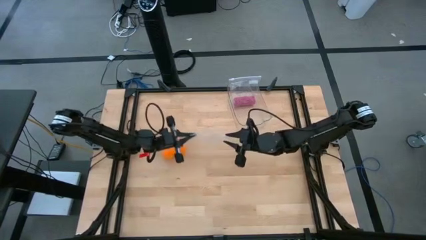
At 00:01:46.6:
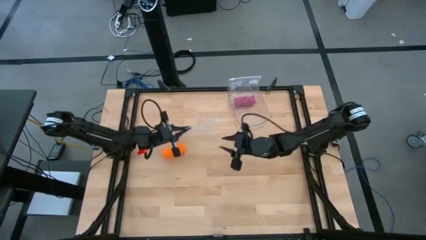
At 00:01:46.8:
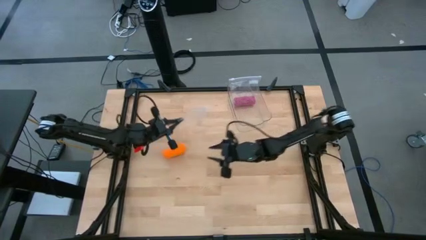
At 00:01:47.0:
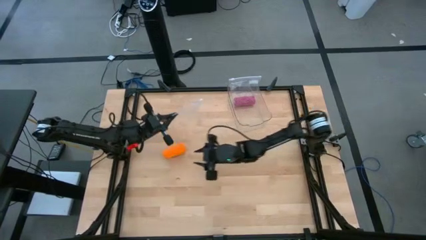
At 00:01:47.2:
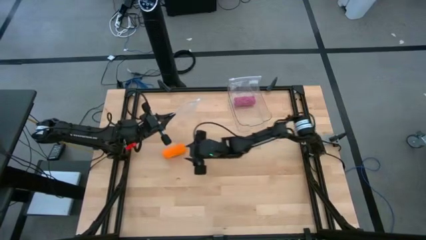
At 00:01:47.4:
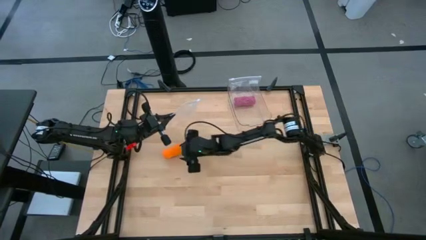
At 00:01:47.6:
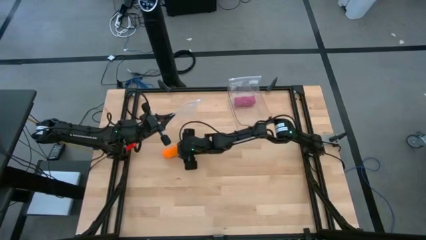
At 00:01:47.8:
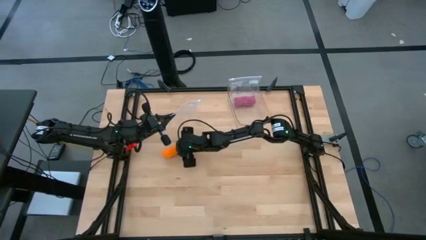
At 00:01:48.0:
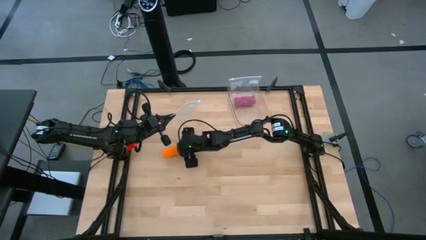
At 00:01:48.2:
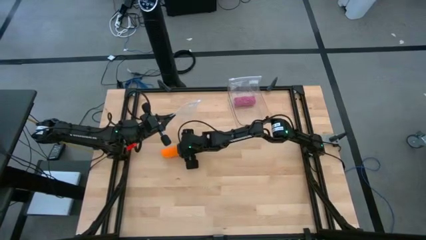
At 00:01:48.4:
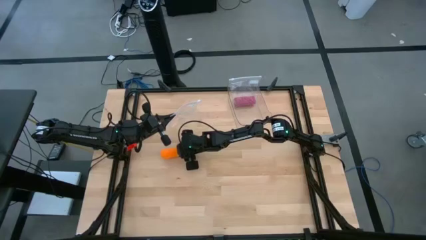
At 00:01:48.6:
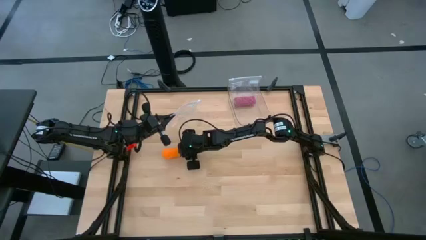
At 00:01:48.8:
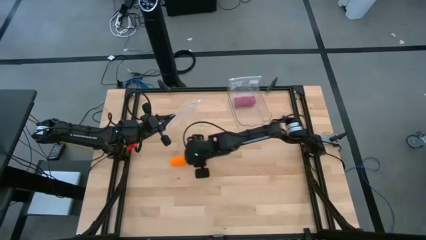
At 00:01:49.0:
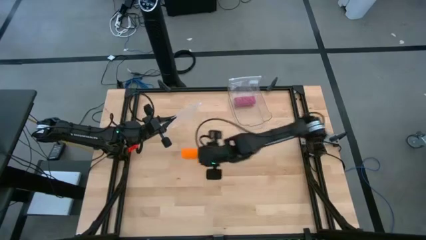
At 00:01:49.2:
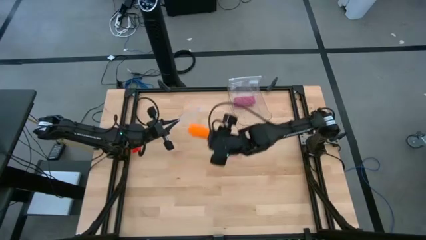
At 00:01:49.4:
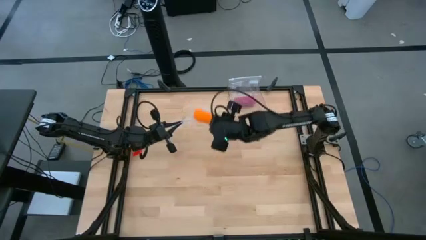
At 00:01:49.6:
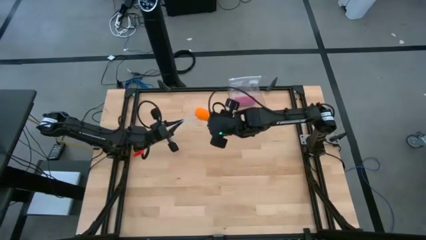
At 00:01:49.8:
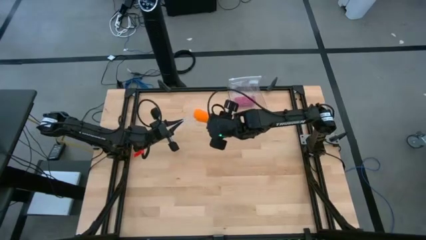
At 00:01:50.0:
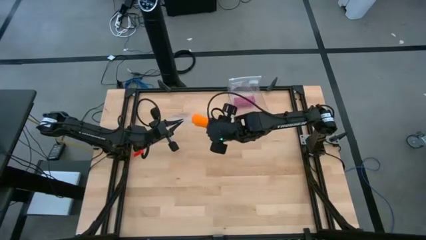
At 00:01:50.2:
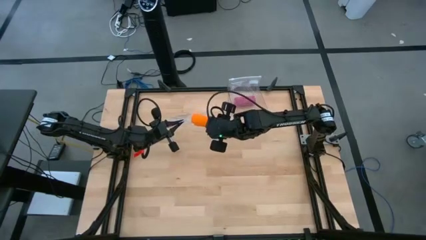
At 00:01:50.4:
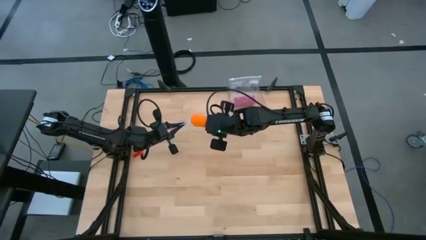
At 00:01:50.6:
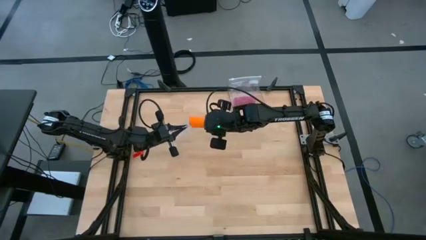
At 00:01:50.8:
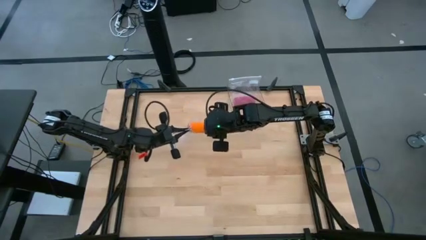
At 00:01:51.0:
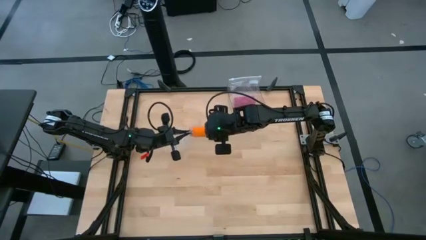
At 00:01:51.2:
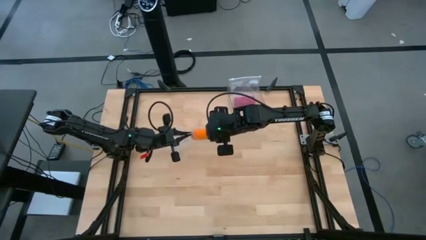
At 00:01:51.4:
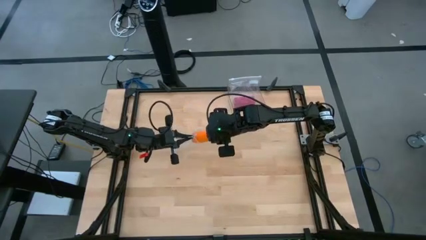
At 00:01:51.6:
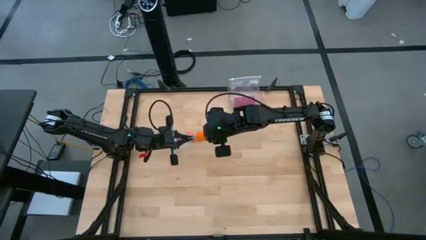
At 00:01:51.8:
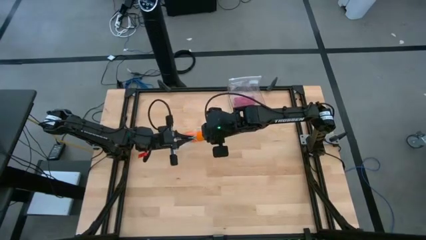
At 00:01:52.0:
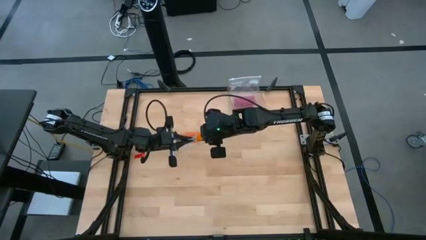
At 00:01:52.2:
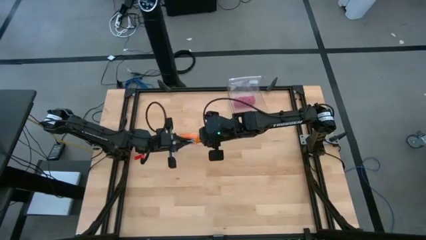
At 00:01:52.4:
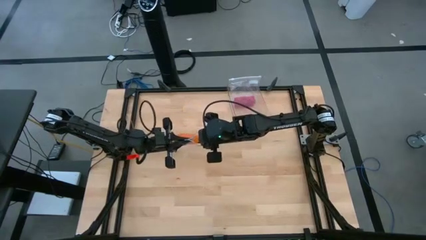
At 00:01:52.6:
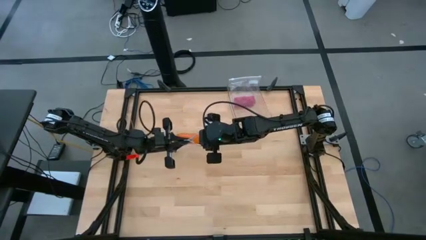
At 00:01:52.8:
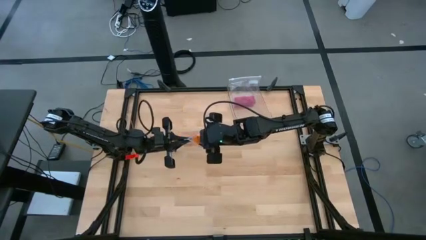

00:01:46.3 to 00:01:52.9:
Task: Roll bandage
Put the orange bandage into the transparent zip bag

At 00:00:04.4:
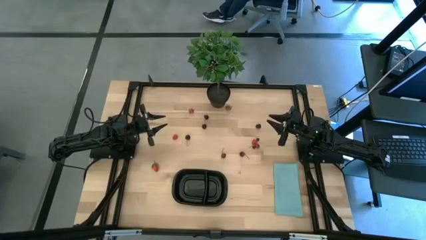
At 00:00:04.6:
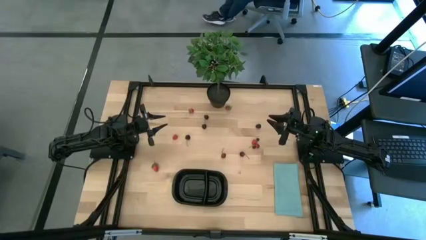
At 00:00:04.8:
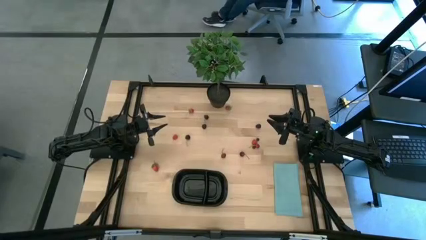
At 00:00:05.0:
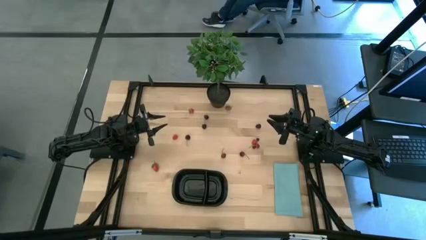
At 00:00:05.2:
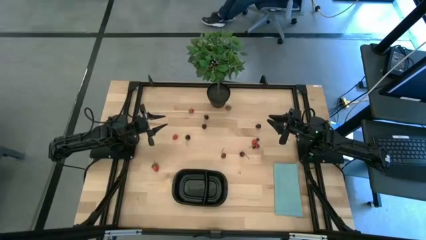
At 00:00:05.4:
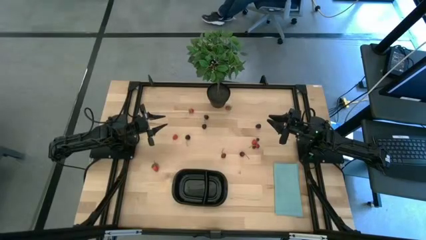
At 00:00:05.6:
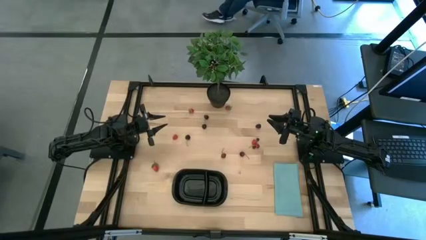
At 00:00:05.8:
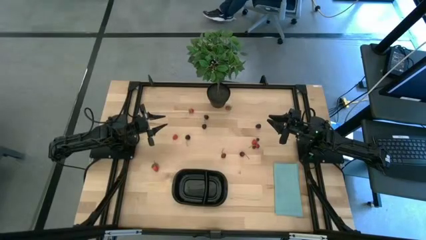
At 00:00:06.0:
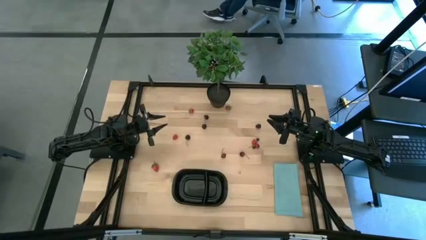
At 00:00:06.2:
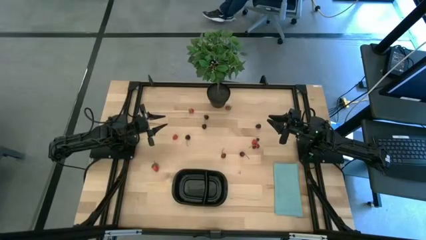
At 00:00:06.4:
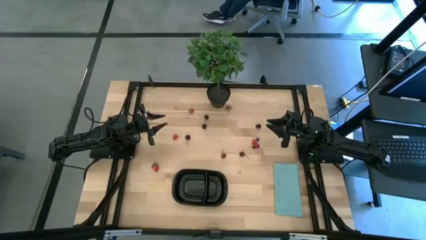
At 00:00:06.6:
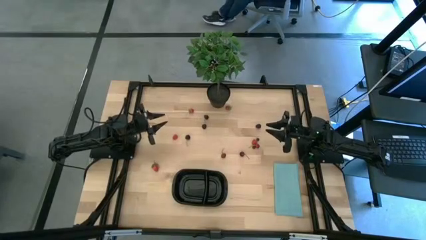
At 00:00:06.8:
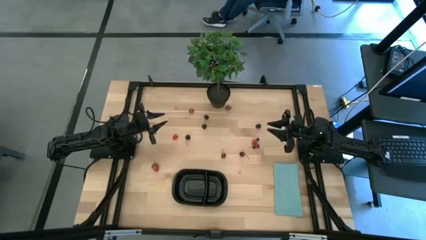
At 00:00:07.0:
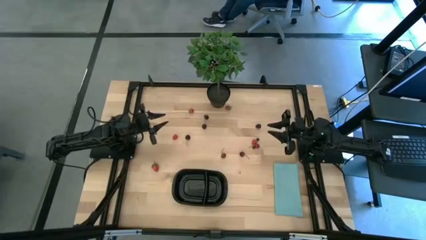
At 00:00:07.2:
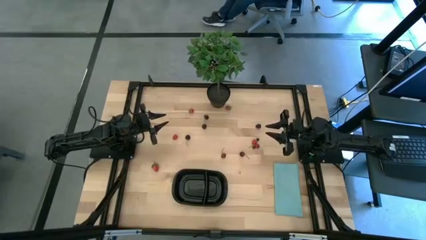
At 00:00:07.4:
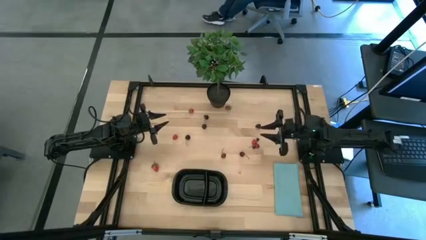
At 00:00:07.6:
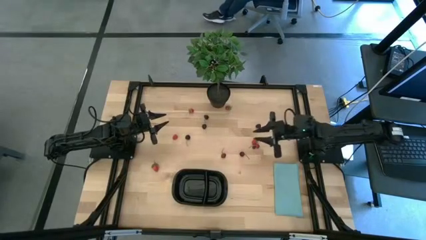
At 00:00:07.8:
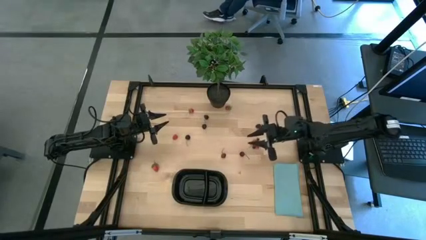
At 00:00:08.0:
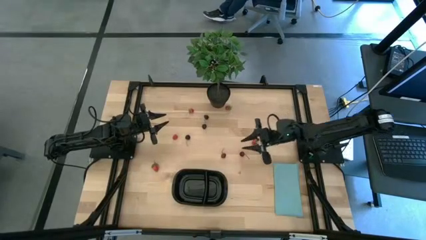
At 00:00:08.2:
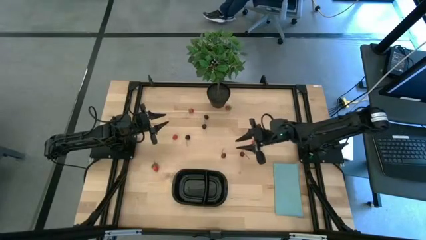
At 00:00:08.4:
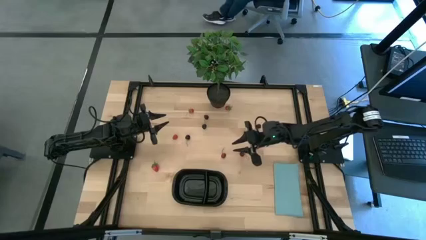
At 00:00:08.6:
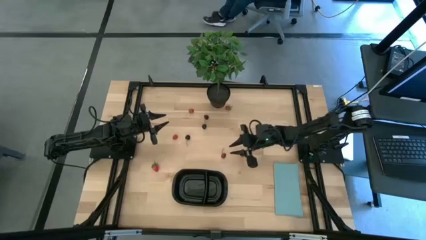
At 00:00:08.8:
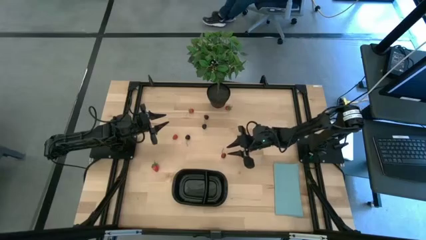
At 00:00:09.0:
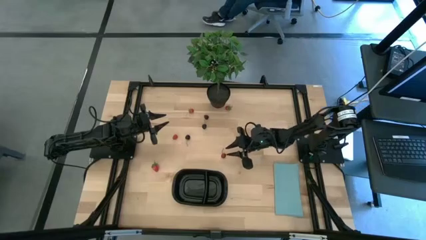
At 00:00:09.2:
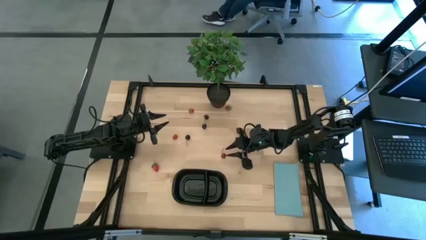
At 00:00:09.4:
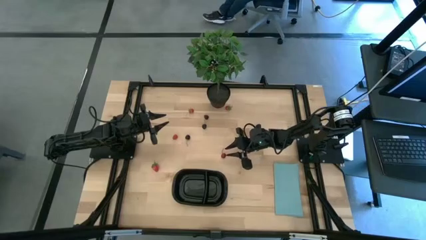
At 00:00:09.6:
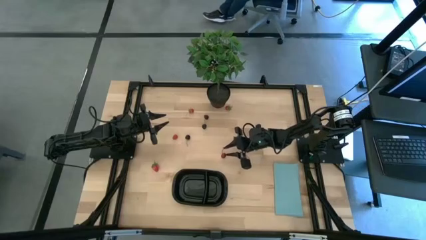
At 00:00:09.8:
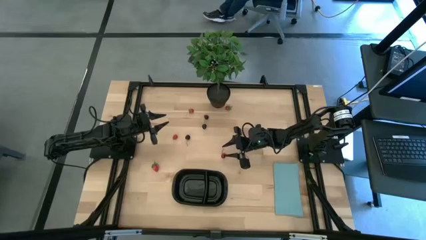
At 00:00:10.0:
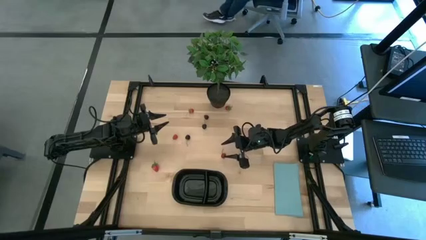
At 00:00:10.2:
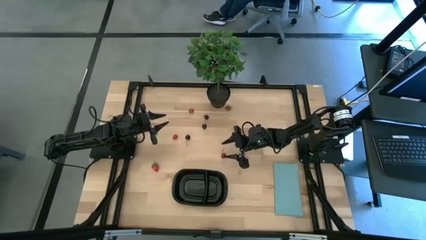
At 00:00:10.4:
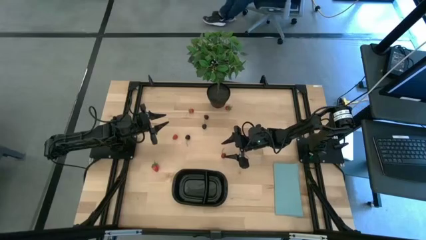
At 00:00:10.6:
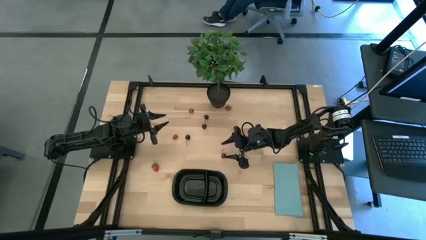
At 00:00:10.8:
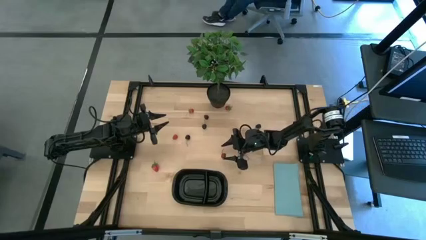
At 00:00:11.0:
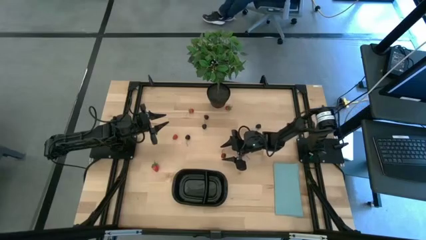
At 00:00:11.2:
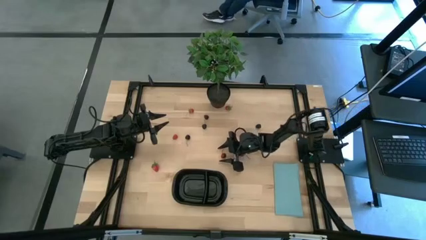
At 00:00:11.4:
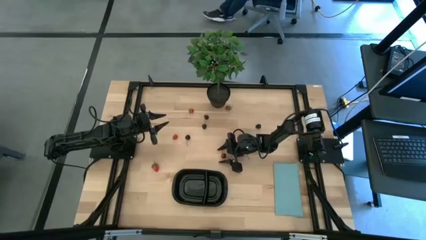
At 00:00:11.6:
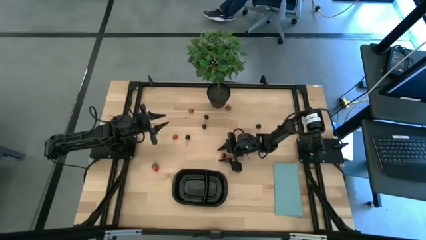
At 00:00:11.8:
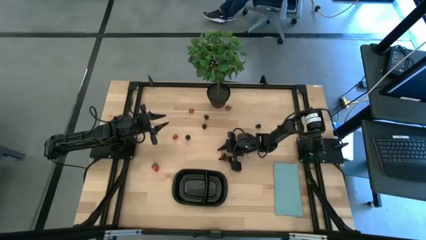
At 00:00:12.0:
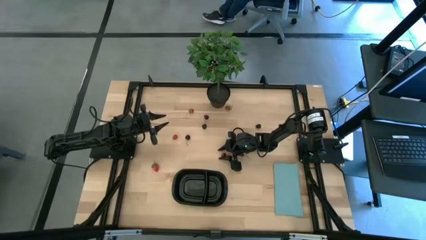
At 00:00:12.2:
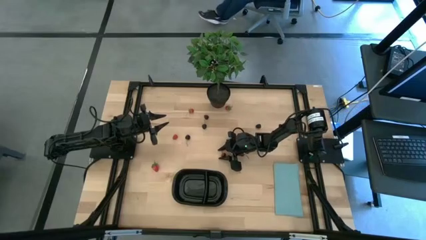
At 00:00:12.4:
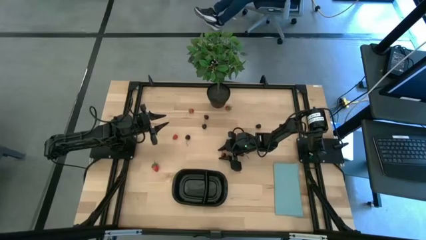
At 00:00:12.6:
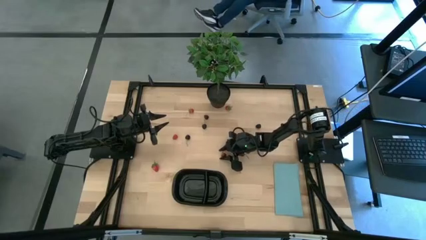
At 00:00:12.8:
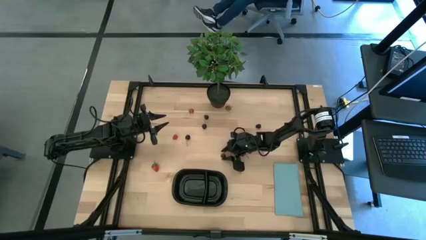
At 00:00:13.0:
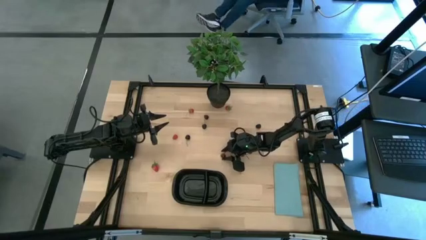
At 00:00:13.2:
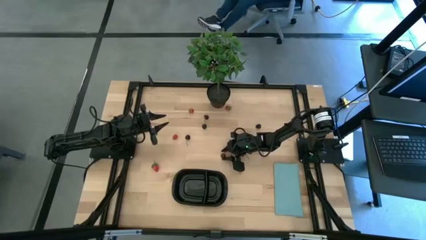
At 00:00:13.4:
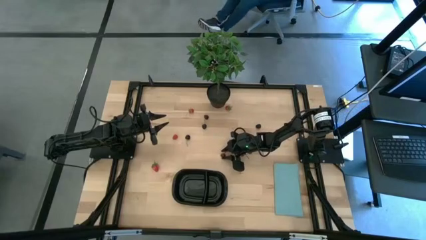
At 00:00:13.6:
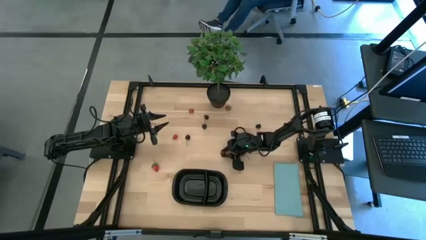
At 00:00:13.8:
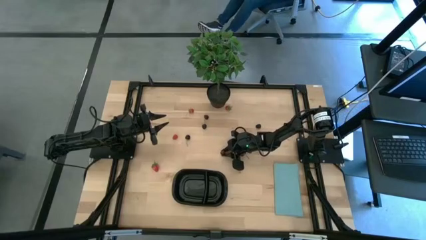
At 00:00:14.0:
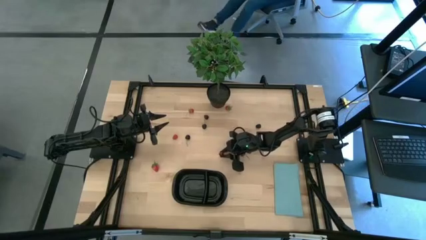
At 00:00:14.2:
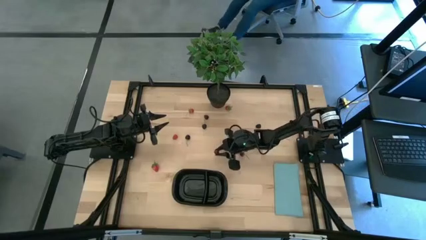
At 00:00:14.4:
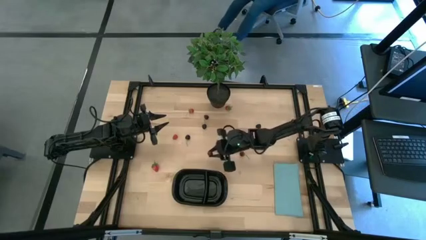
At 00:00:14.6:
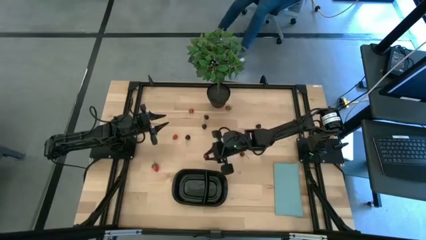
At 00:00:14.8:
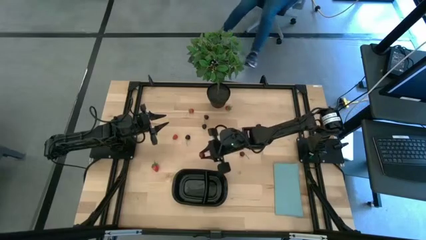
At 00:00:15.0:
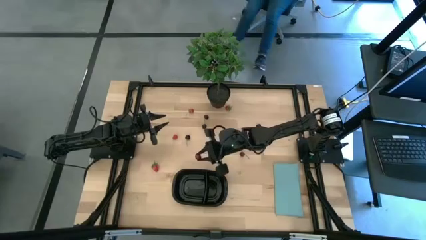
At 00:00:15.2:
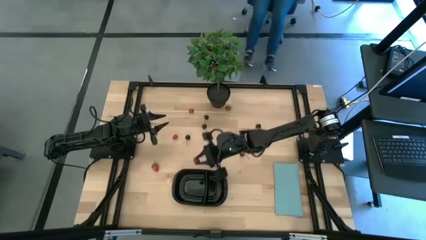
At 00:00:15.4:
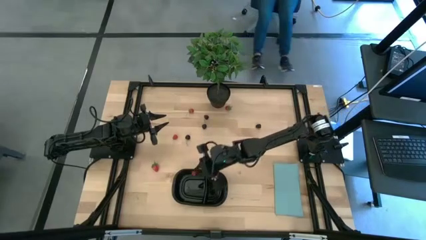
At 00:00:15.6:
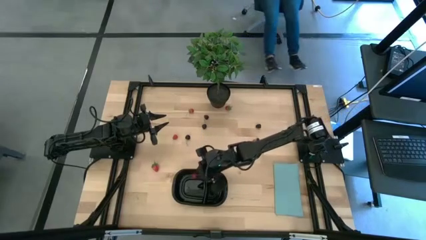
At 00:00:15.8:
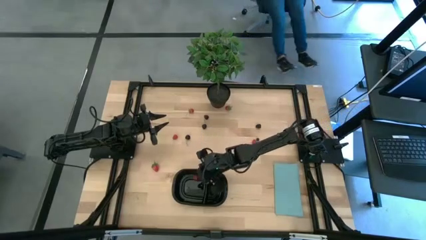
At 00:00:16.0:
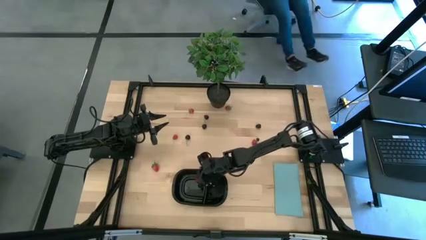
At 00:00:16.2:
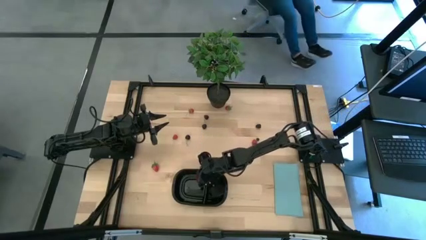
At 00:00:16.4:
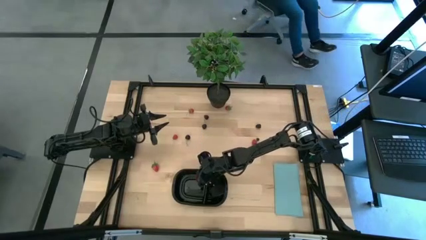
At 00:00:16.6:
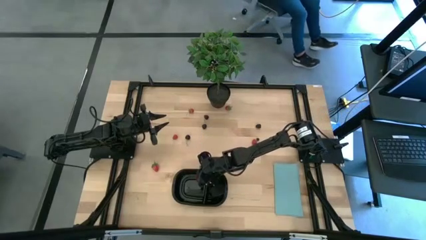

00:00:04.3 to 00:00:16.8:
Task: Pick and placing Produce into tupperware
Put the left red cherry into the left side of the black container
